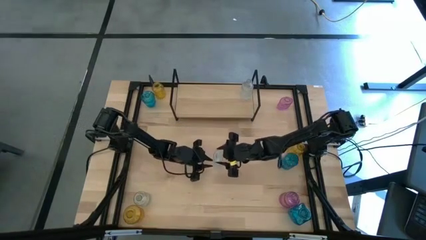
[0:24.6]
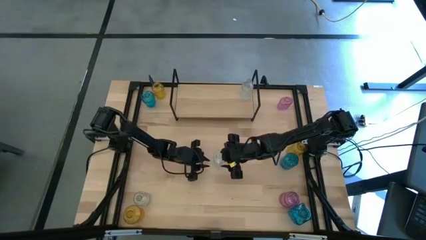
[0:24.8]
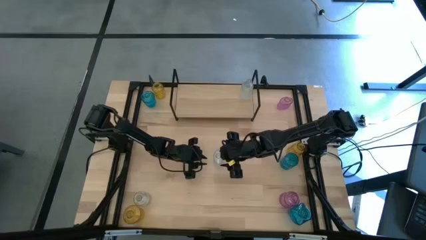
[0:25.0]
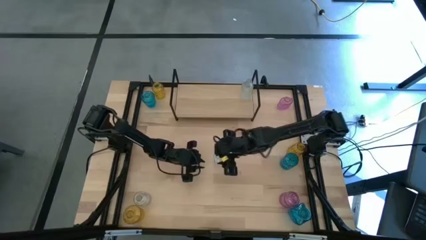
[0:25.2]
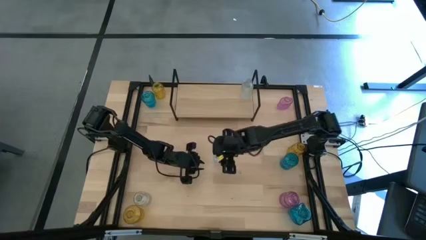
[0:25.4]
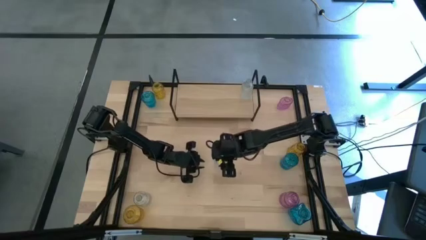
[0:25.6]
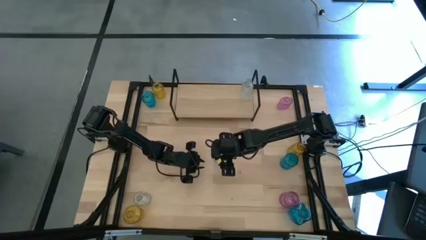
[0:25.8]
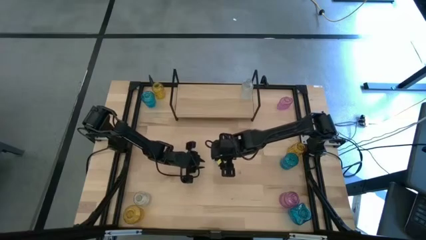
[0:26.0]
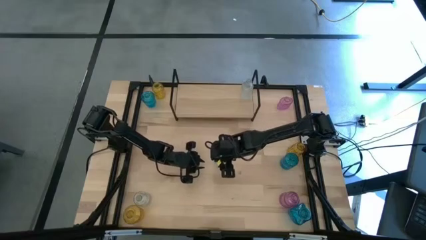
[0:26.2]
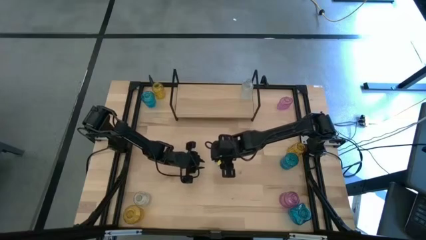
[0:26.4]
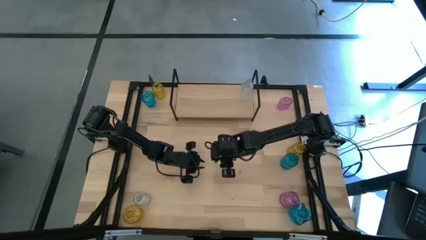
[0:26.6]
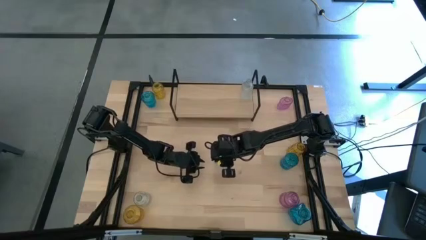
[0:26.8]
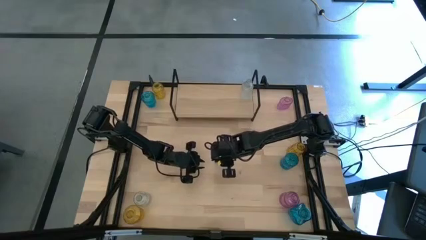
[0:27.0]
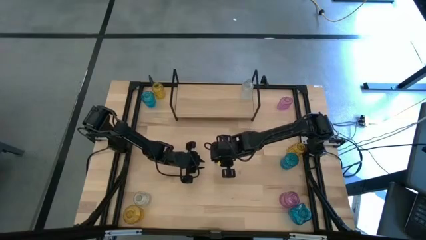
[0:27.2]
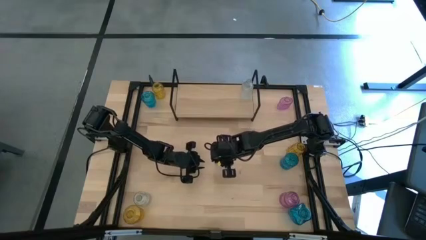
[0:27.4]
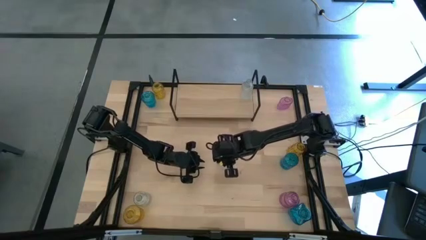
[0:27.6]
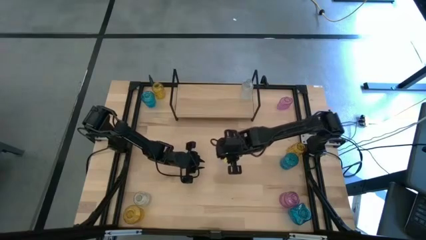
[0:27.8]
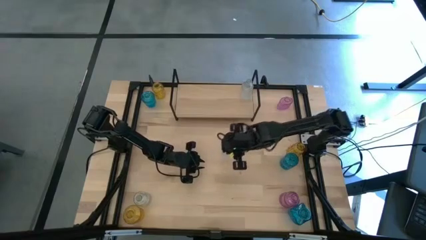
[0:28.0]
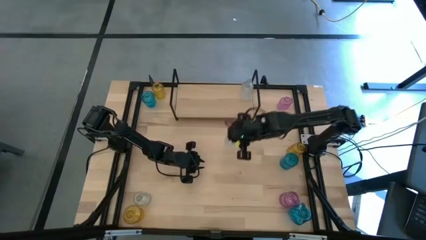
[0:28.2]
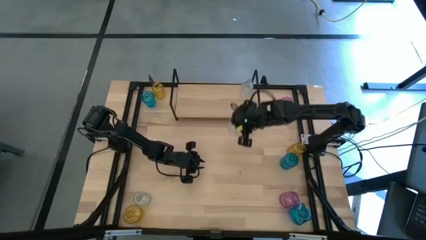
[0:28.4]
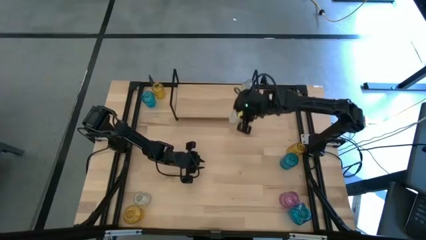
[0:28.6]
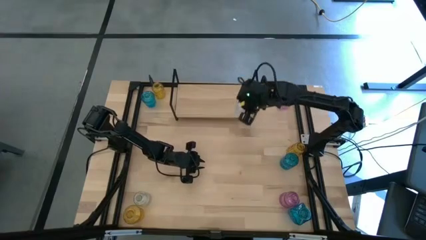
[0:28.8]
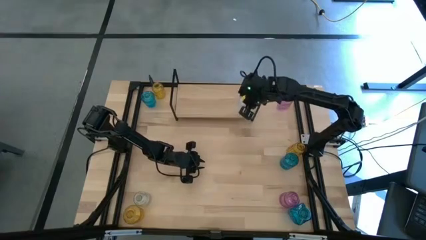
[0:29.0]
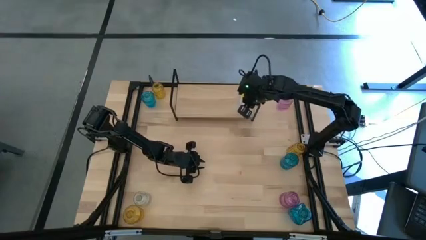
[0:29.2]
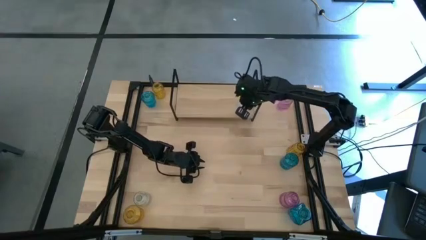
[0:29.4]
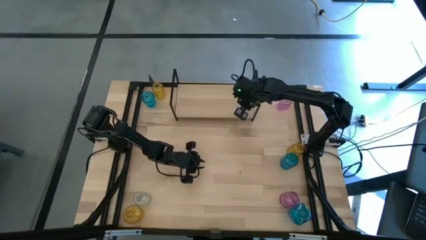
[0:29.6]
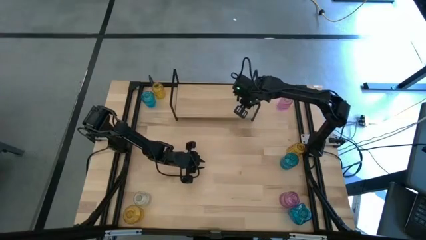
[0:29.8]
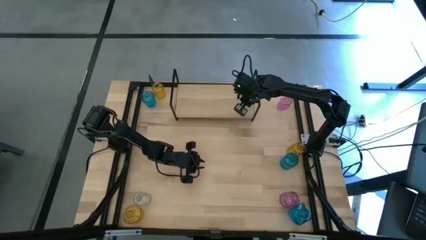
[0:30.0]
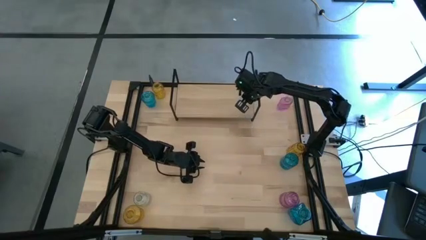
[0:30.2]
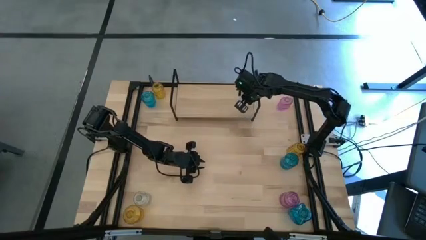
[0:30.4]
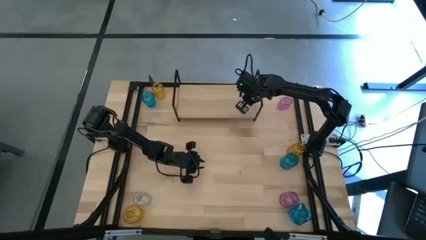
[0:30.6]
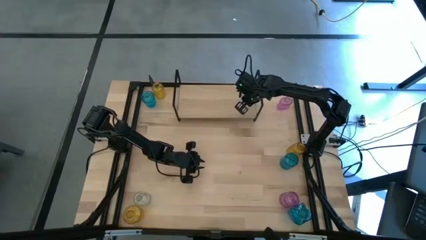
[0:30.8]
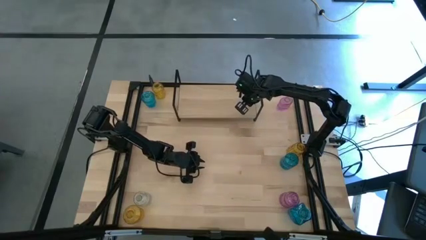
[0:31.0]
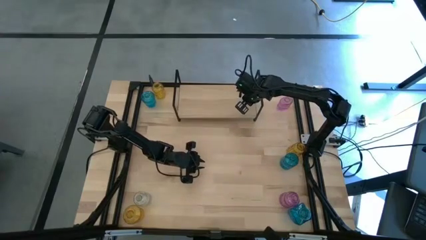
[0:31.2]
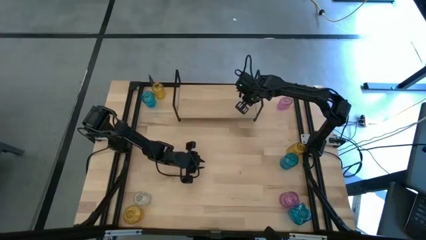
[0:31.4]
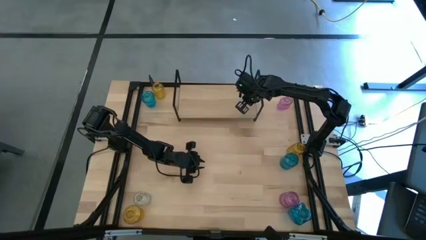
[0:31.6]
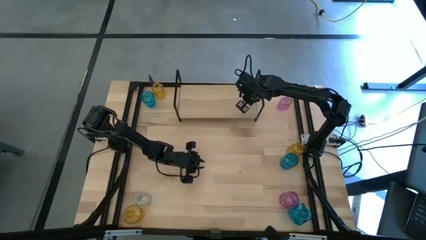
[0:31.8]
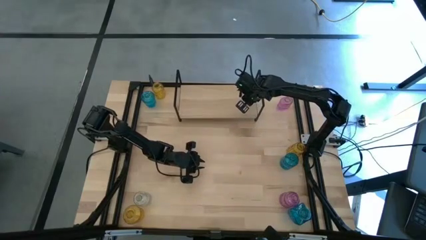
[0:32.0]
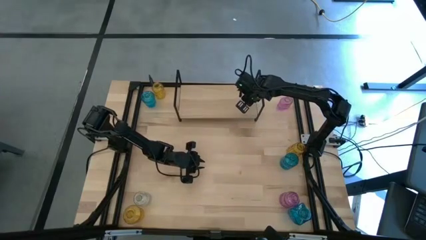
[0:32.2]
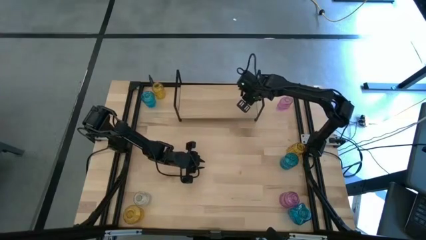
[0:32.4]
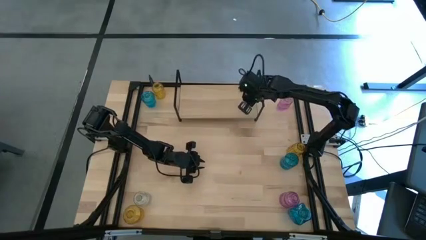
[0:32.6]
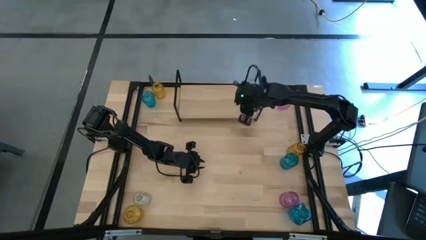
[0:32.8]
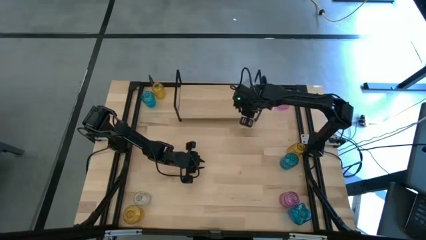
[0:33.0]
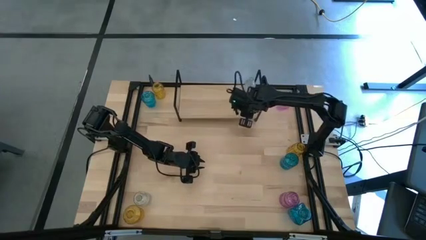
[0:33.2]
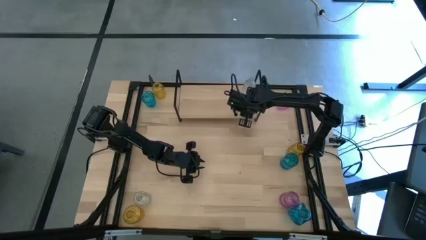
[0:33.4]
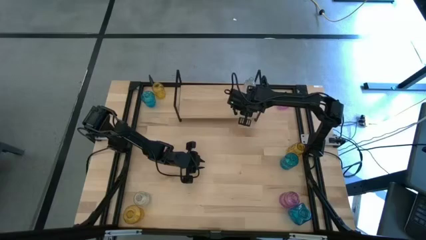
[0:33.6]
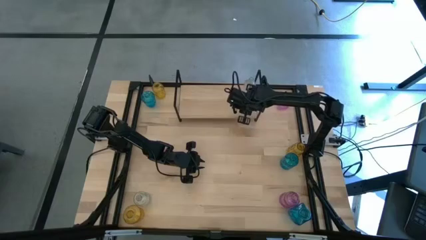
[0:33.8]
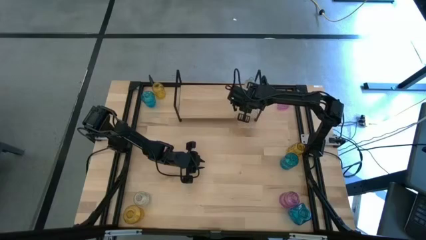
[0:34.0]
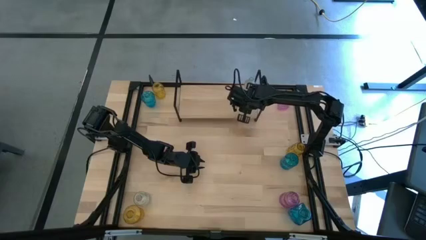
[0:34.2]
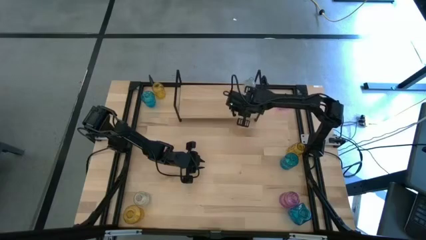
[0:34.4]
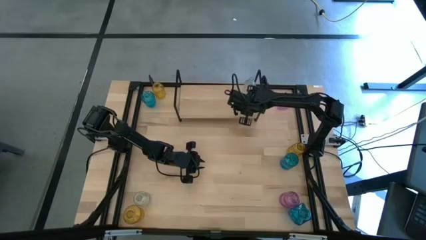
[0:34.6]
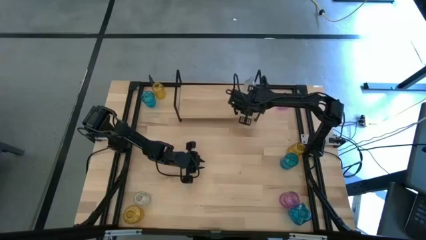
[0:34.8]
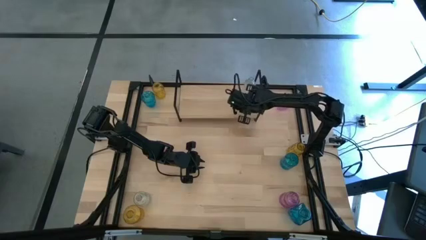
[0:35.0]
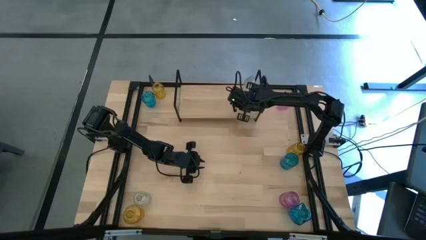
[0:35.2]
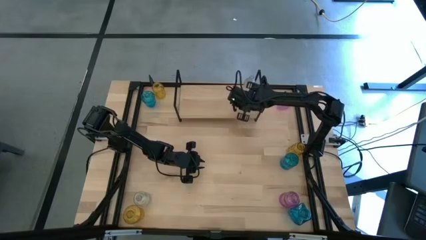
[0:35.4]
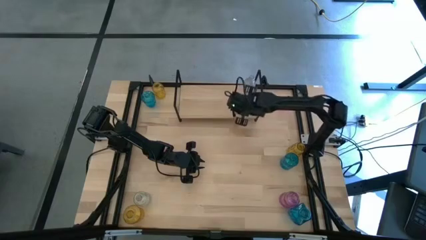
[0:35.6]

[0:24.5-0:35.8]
Task: sort vases onto shelf
Put the top transparent vase aligned with the other transparent vase on the shelf

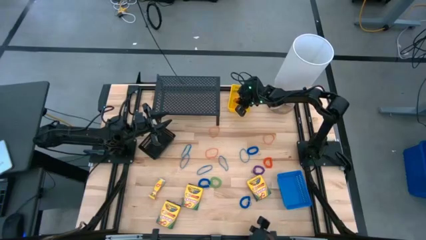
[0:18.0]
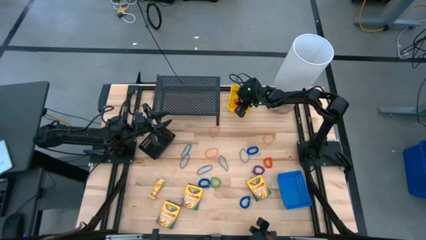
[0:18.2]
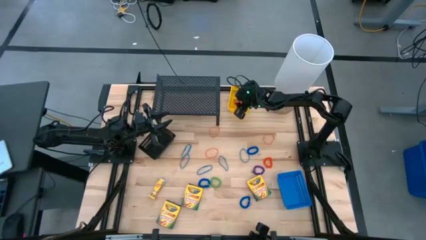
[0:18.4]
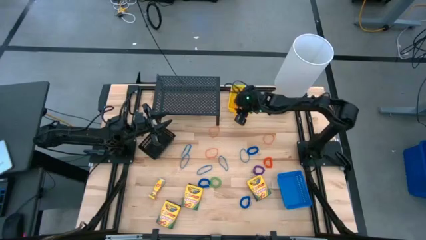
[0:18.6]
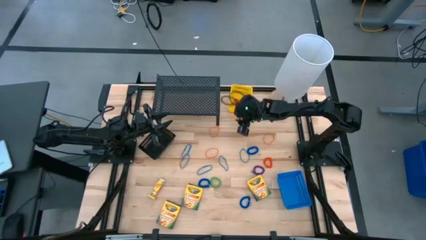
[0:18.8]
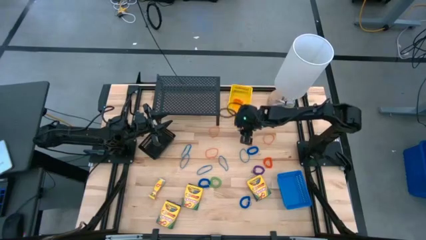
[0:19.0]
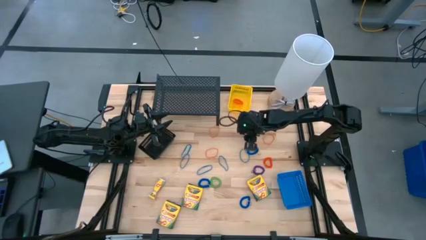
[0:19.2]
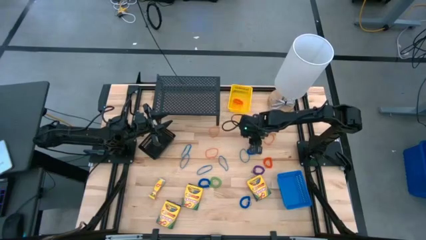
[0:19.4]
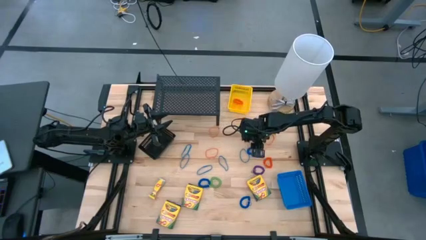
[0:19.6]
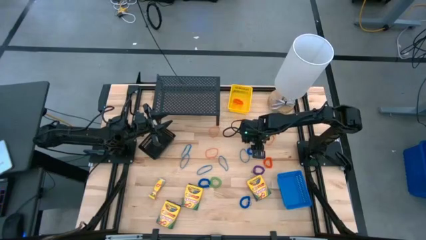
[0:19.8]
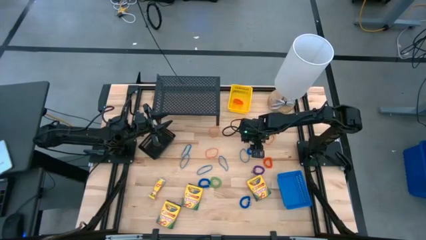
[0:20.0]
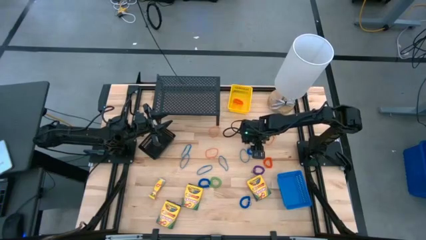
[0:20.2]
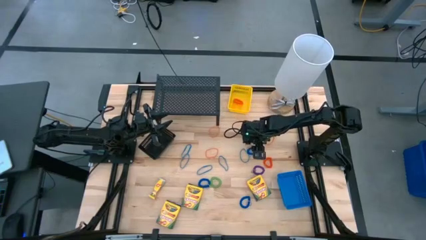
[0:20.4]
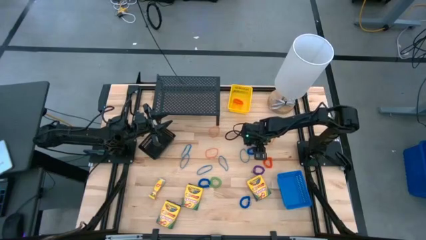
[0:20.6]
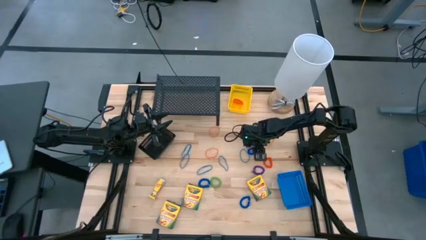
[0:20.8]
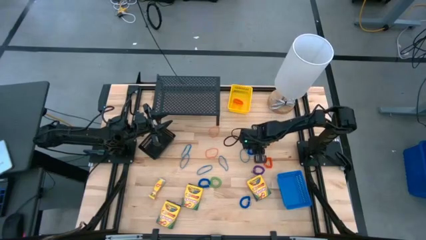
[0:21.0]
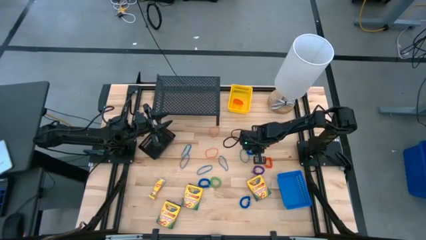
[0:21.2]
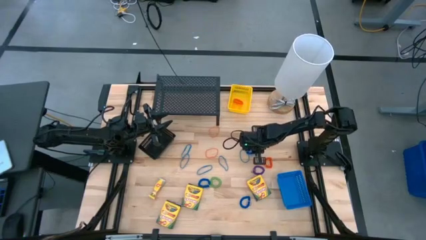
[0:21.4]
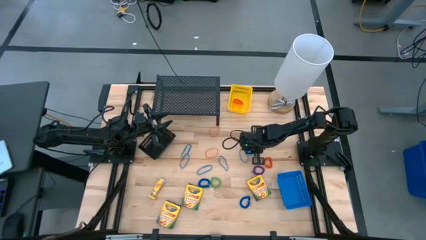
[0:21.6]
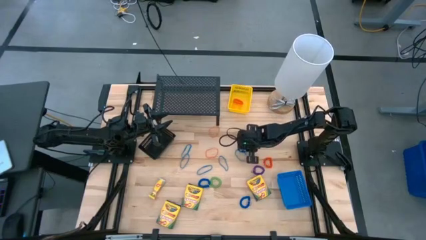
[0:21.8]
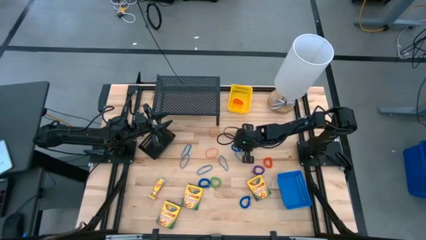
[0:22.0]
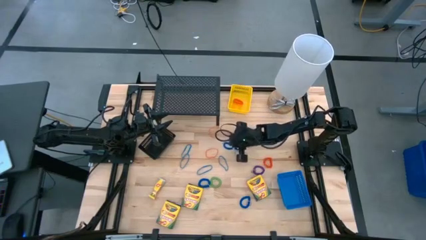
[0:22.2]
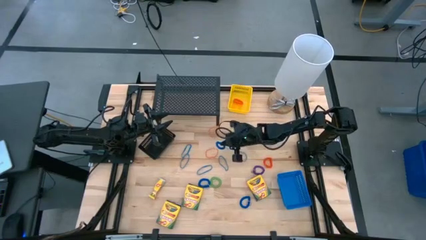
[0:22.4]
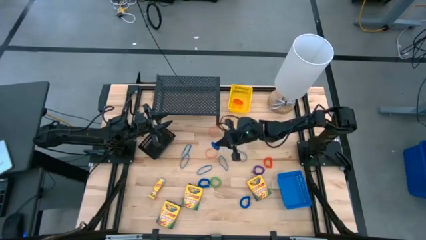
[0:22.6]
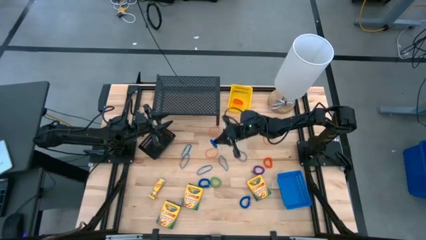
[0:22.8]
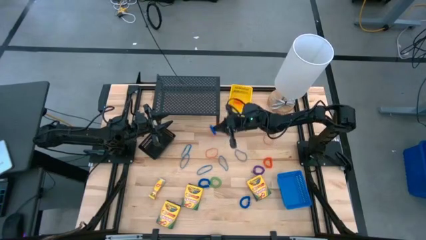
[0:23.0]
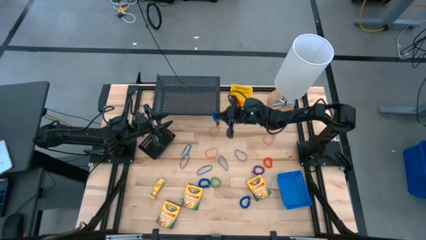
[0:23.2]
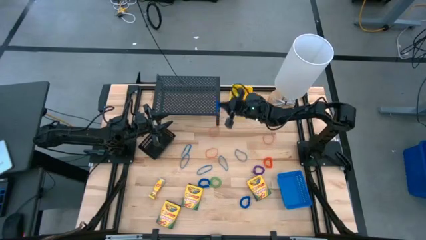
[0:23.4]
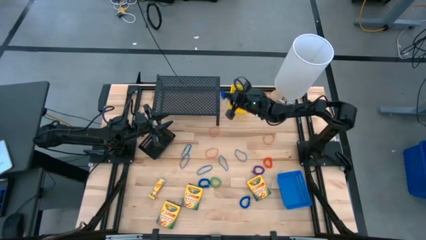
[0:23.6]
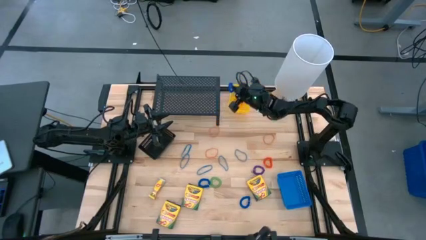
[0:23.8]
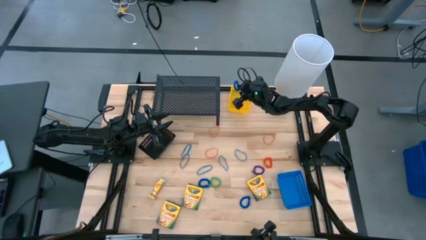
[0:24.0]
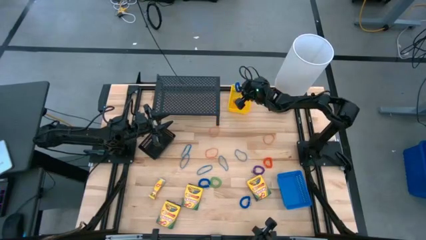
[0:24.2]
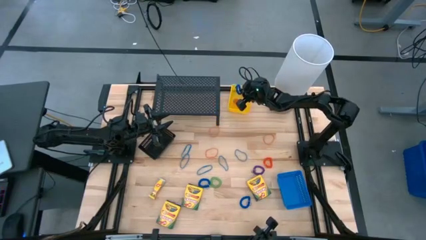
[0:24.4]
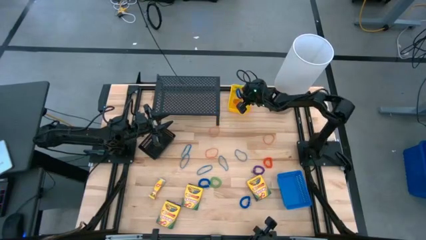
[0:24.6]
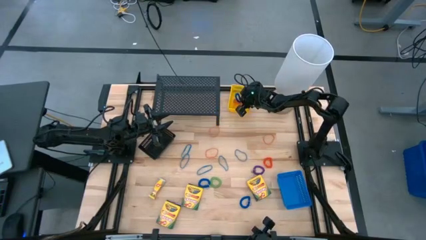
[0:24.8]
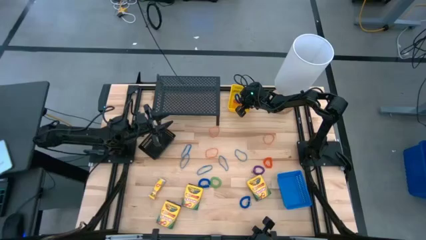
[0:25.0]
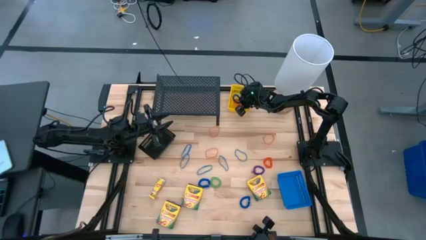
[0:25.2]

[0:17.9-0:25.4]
Task: Pick & Place Office Desk Supplies
Put the top blue spring keychain into the yellow bin
